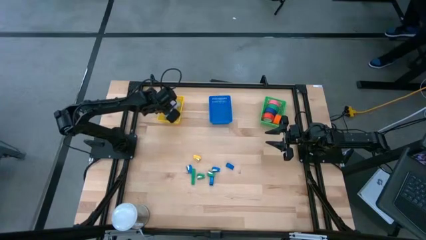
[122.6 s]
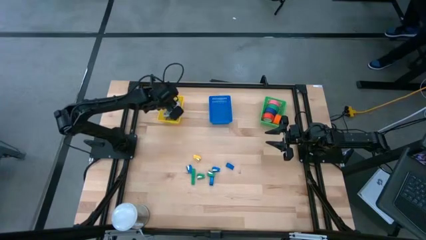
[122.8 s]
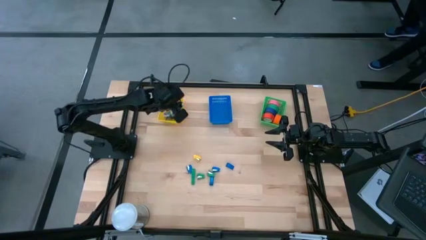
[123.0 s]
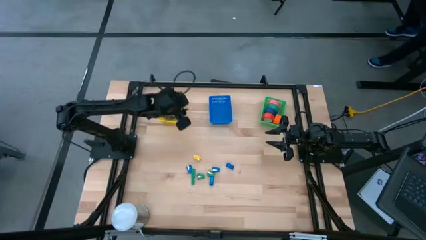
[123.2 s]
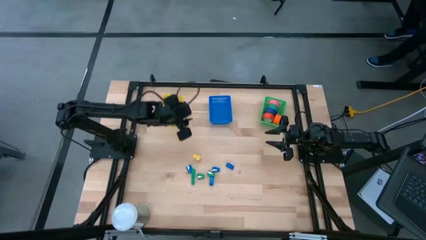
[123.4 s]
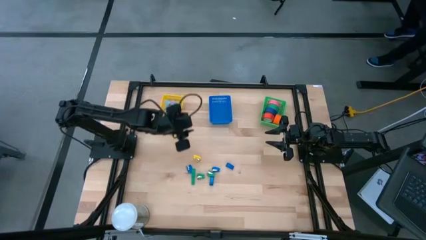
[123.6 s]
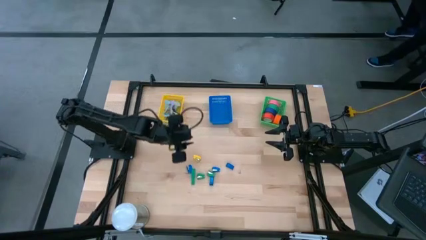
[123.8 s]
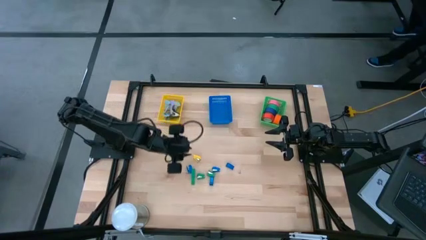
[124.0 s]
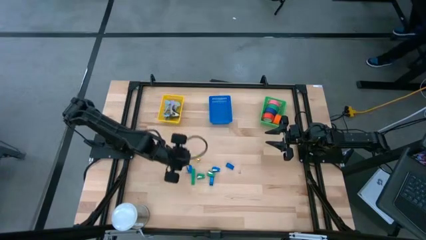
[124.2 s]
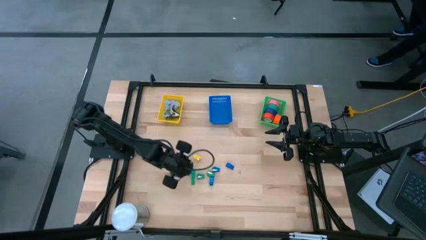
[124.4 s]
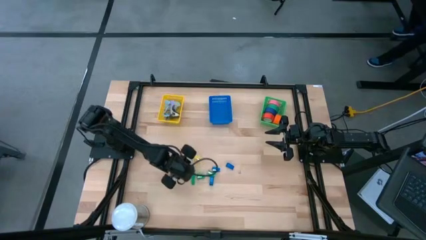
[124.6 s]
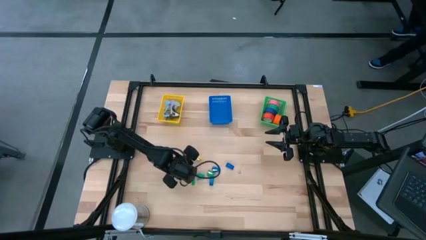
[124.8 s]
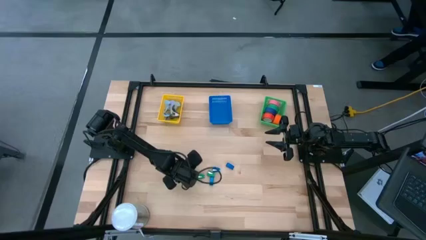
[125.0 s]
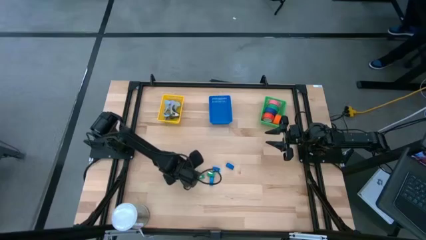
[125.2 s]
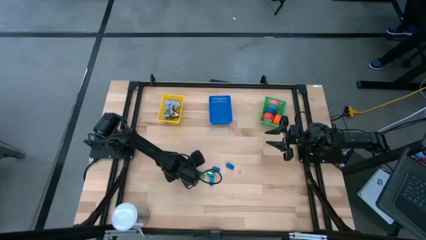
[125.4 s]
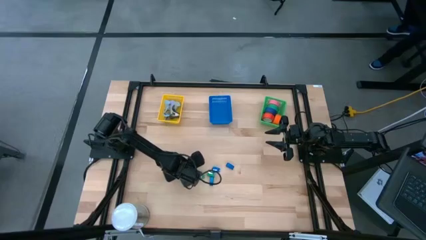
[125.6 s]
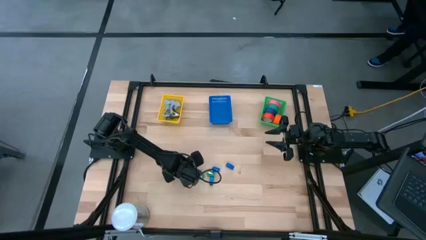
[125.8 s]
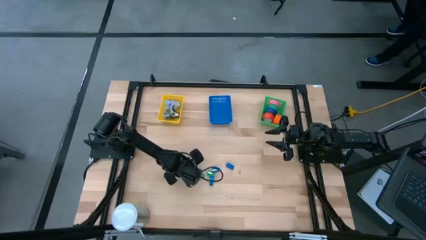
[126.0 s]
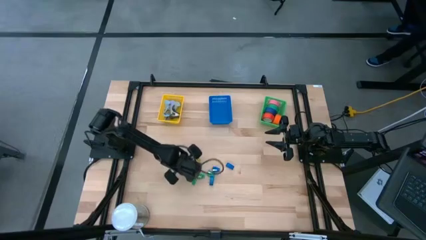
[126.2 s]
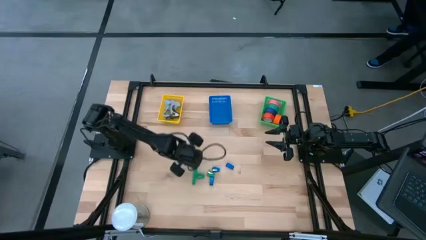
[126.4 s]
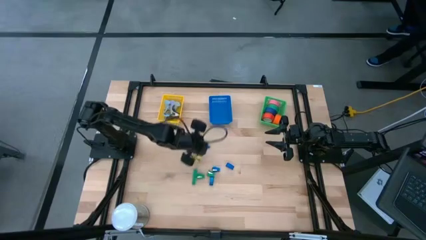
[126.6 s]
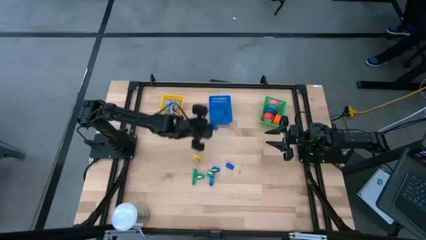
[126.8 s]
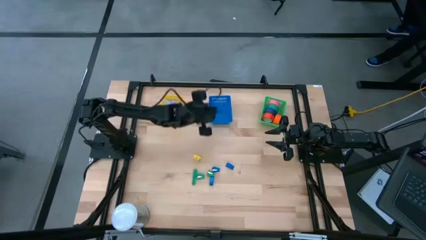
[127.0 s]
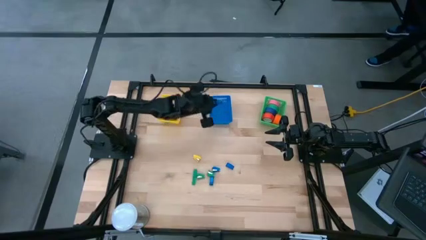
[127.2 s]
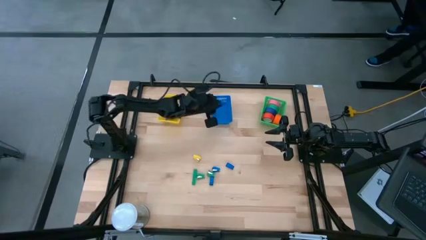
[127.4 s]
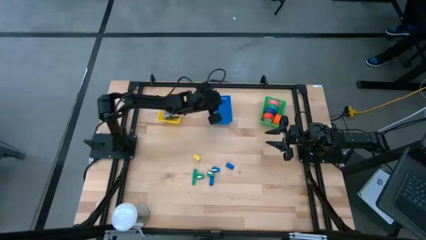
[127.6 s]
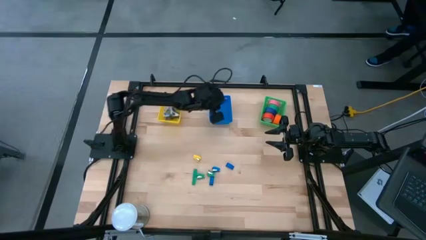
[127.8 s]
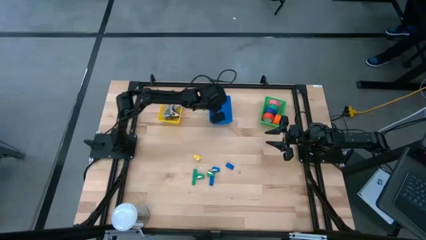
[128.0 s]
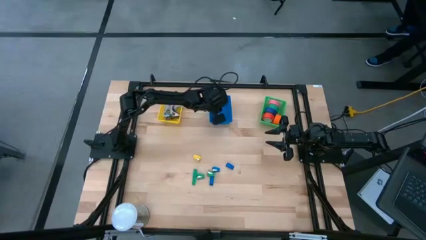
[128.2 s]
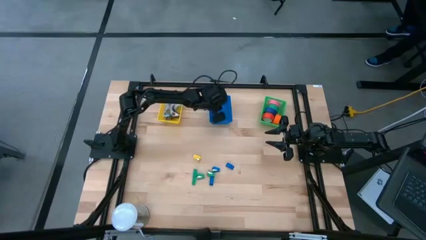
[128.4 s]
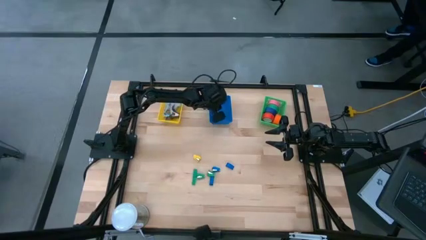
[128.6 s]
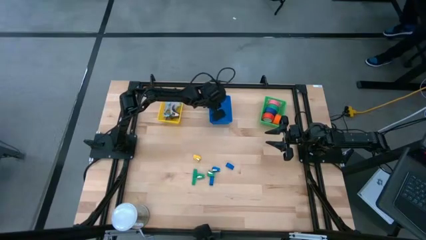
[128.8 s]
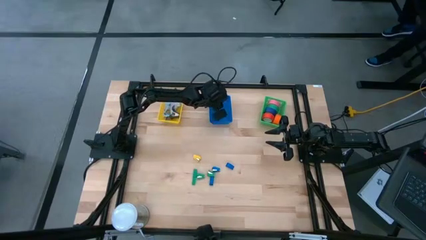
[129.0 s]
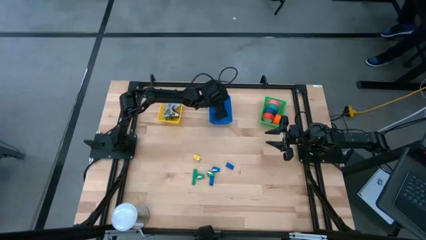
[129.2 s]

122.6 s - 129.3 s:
Task: Pick and place Stapler, Stapler remover, tape
Put the blue stapler into the blue basket

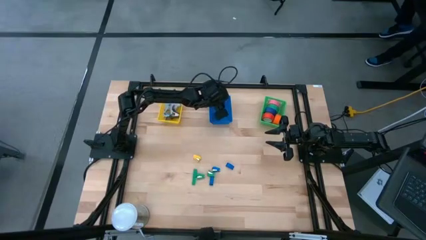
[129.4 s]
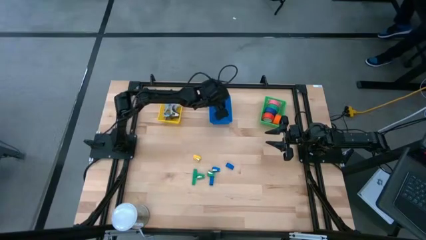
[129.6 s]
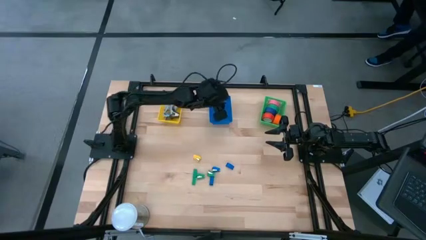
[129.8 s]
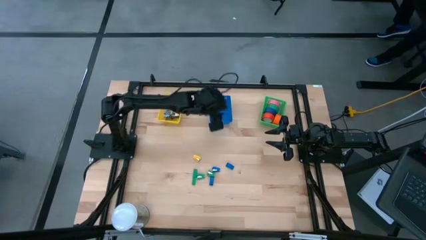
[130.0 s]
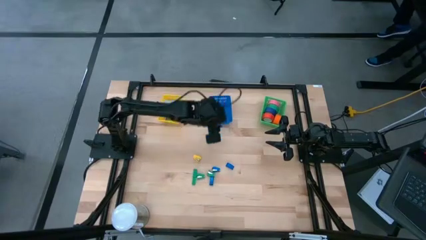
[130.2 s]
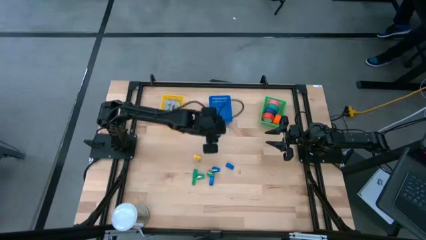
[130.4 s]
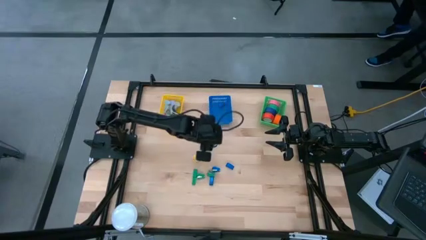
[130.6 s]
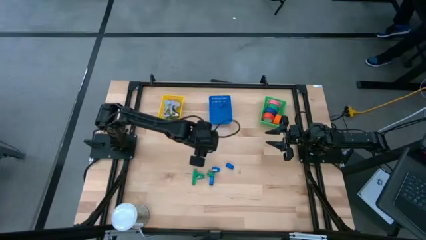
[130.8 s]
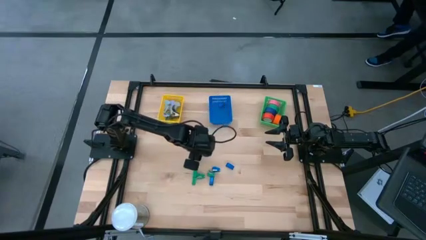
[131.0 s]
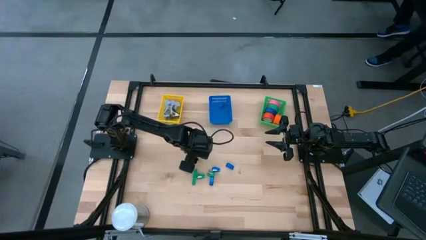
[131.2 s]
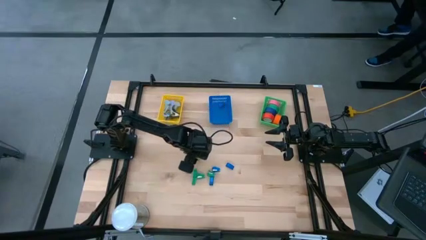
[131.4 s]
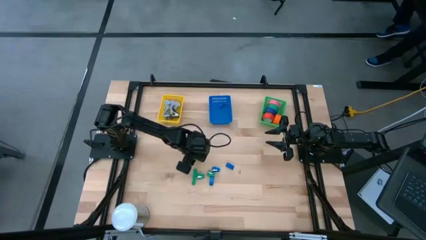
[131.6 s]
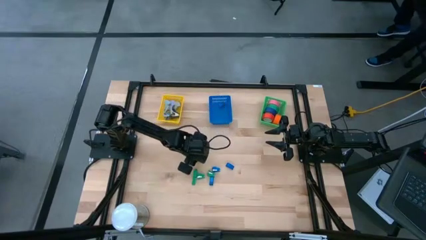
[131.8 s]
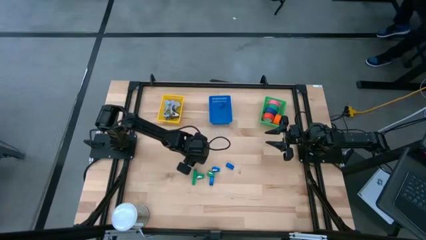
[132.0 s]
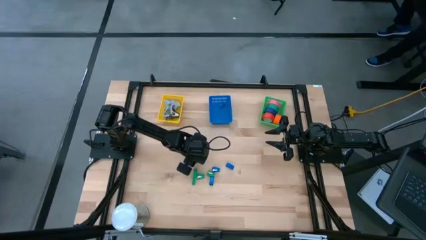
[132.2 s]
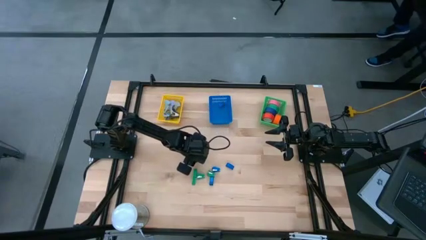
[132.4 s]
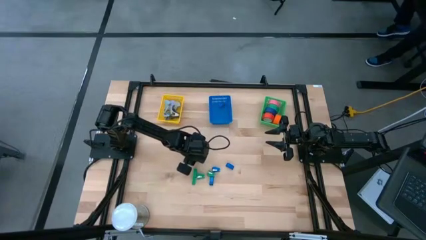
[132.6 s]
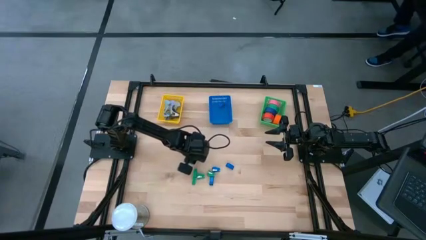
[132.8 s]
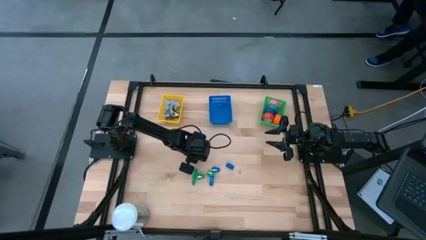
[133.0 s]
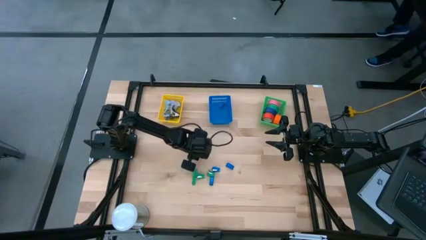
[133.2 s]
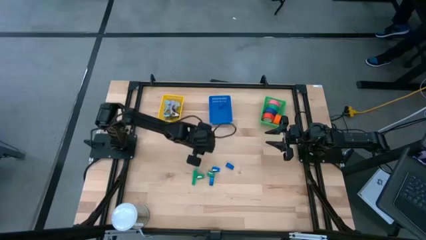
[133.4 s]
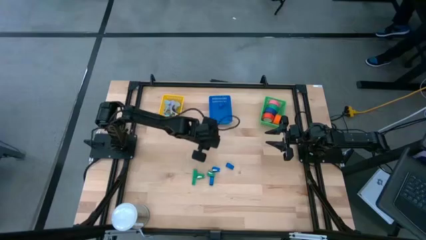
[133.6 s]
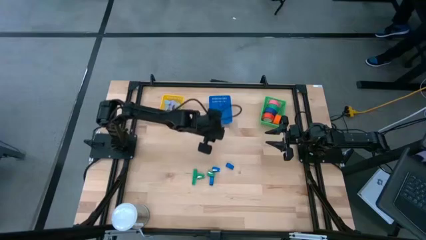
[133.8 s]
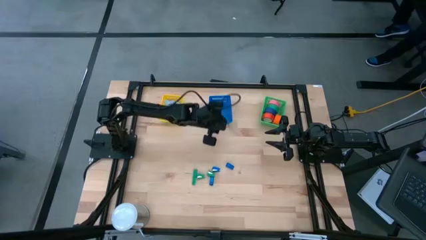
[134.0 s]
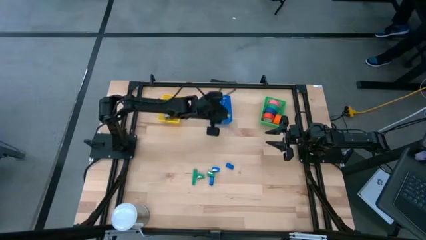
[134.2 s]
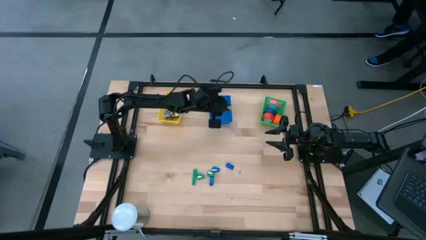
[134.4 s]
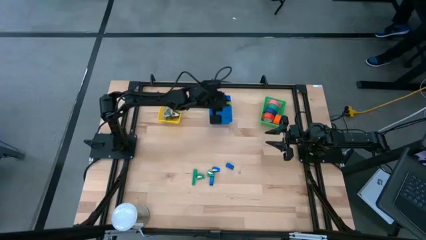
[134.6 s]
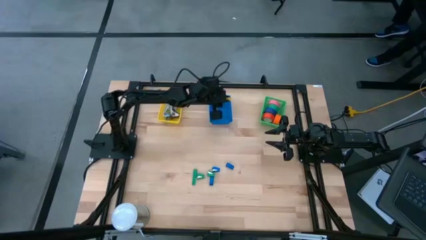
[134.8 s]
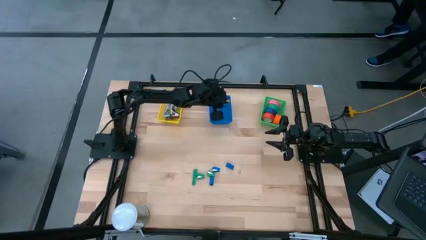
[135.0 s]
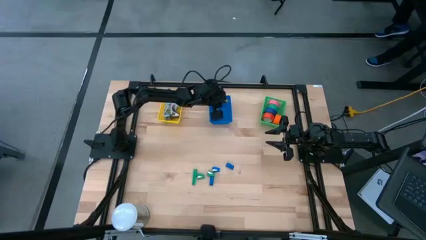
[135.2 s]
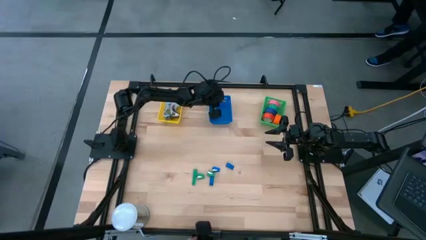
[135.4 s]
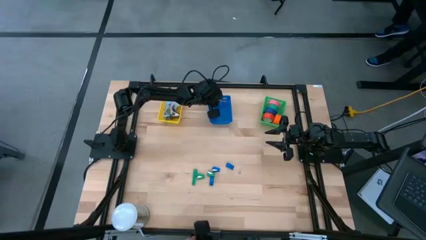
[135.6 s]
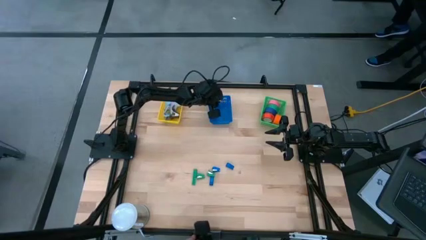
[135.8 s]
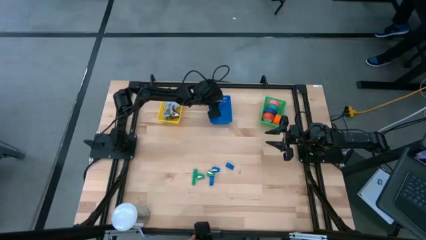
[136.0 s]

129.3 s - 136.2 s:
Put the yellow stapler into the blue basket

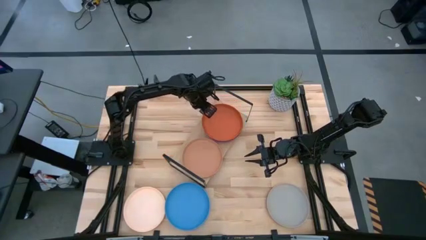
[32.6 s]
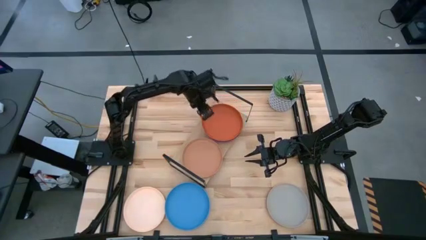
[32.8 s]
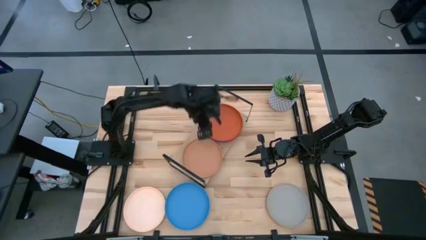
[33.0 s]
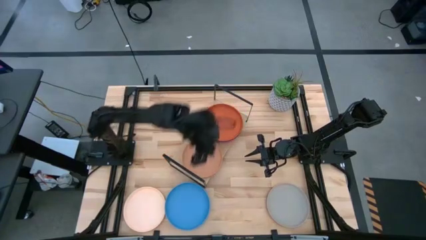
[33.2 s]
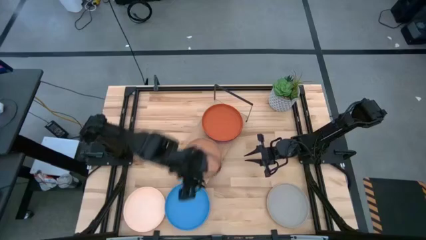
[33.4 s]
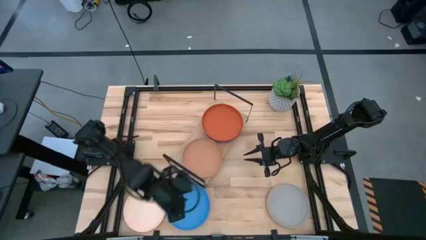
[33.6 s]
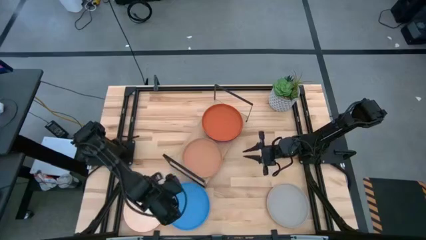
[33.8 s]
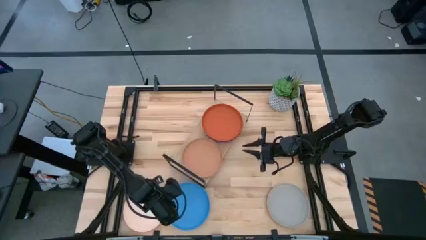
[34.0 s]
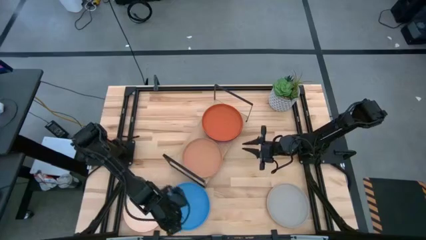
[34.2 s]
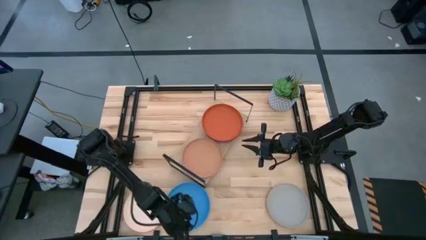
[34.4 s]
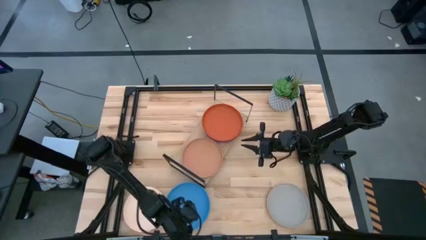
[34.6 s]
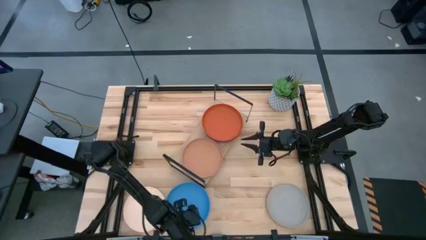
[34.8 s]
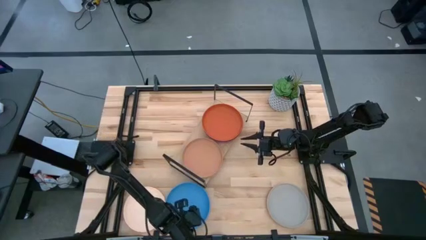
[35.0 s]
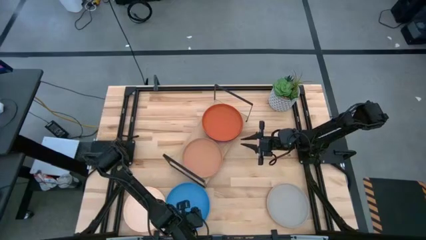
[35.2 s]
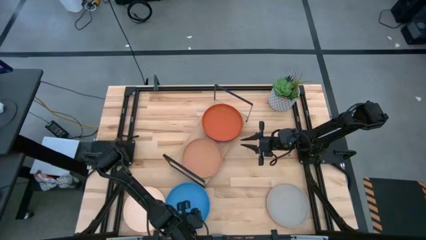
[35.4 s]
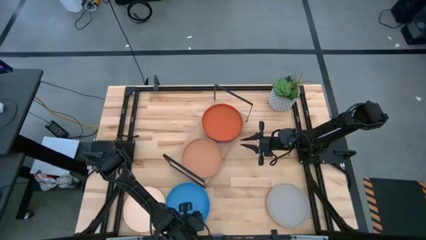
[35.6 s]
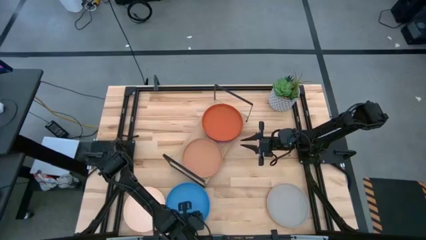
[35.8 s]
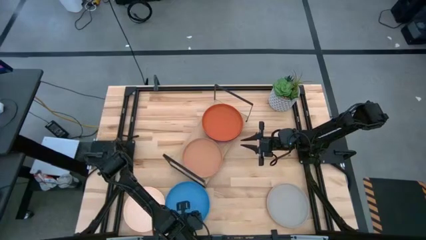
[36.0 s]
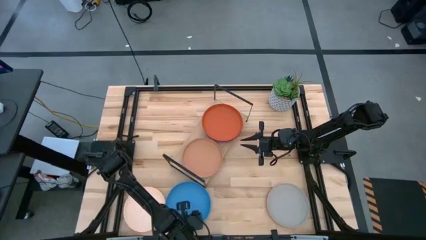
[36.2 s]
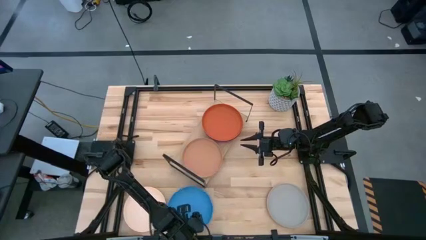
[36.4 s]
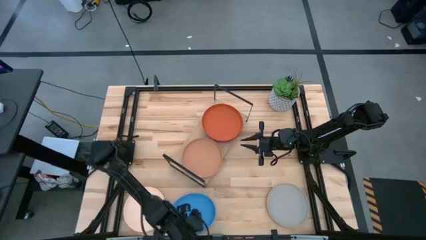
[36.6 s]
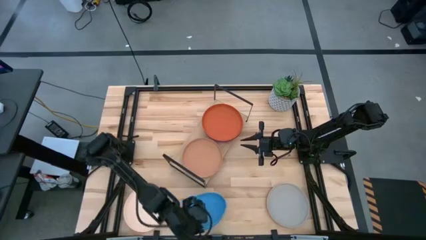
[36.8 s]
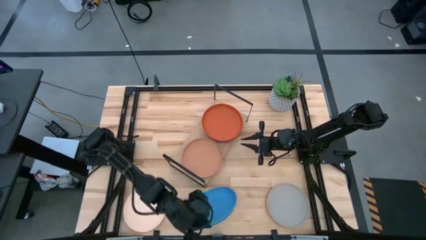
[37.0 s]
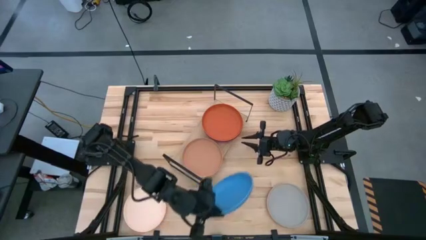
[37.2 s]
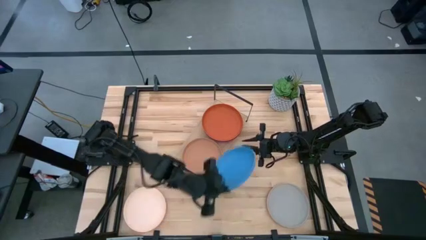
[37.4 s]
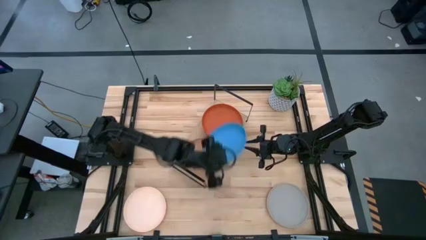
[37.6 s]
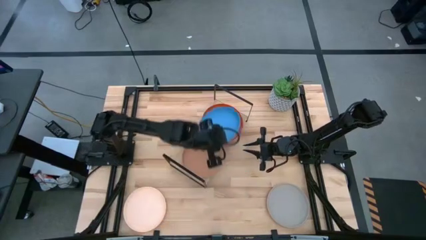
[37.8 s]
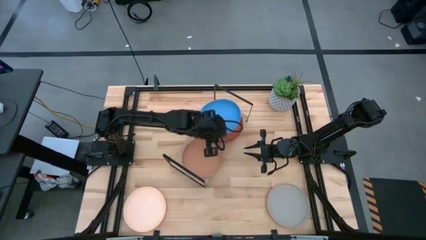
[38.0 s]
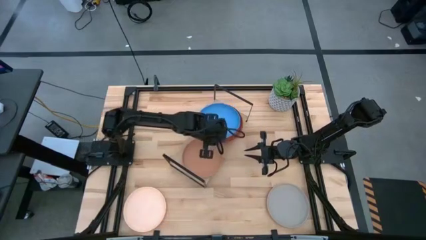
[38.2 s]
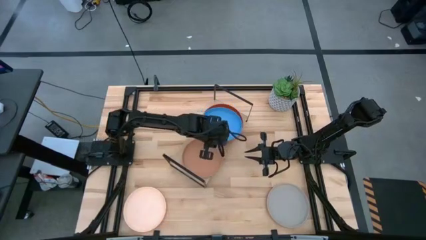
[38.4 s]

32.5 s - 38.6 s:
Task: Place and stack plates onto a shelf
Stack the blue plate on top of the orange plate
